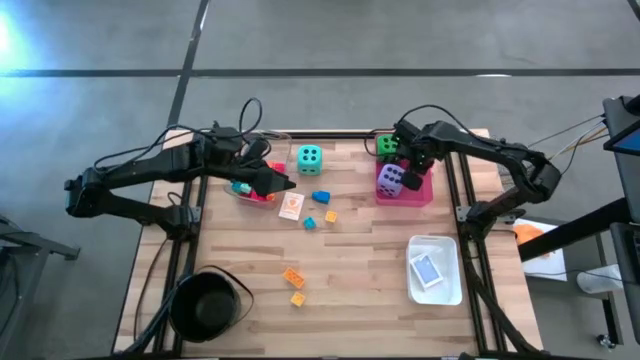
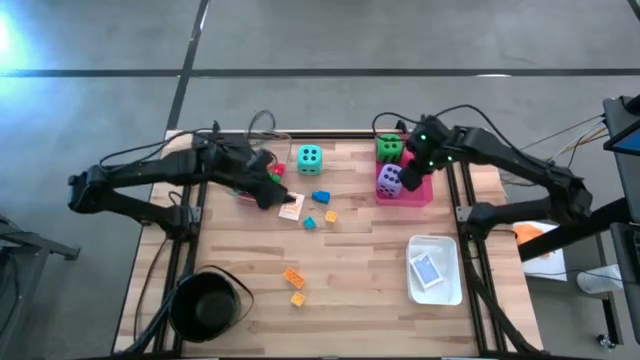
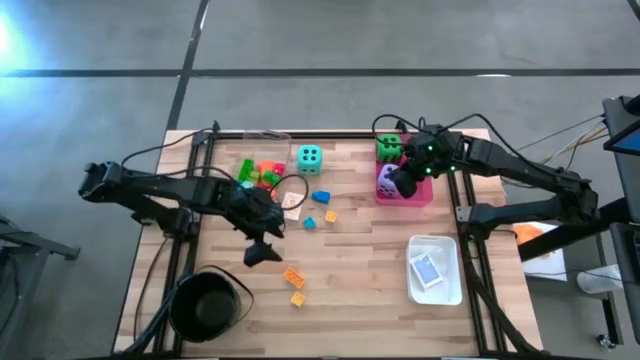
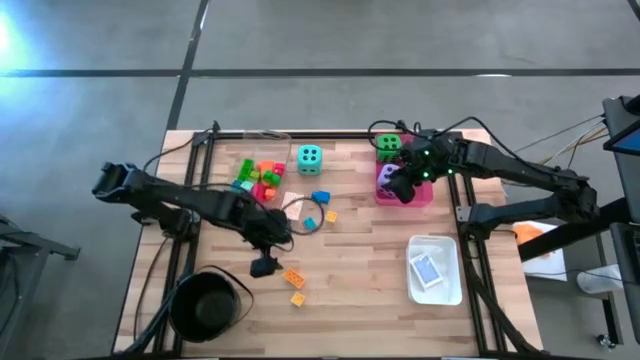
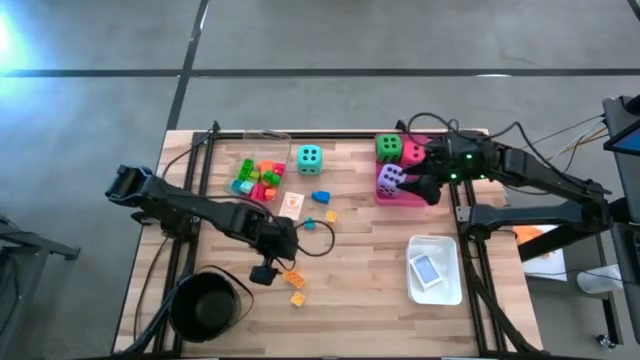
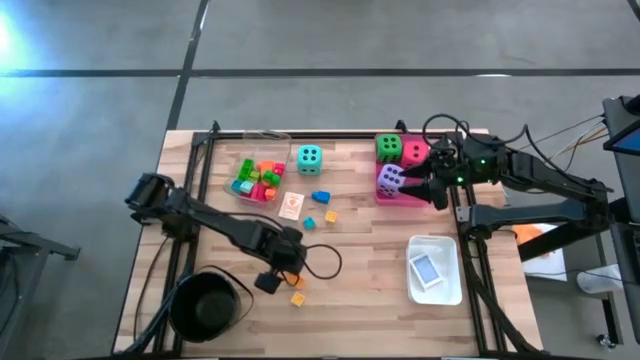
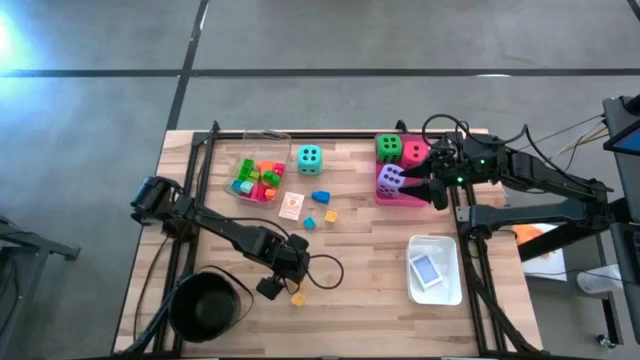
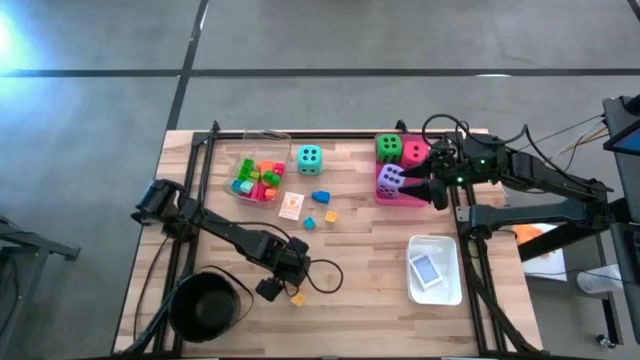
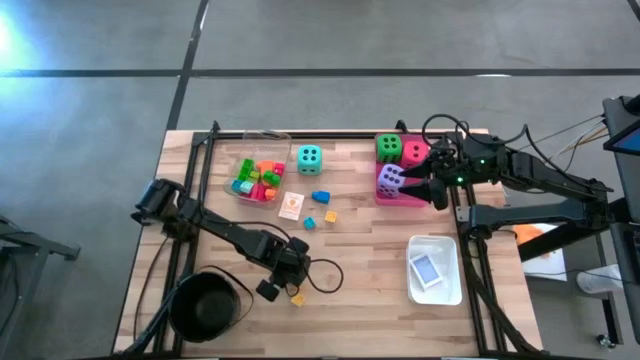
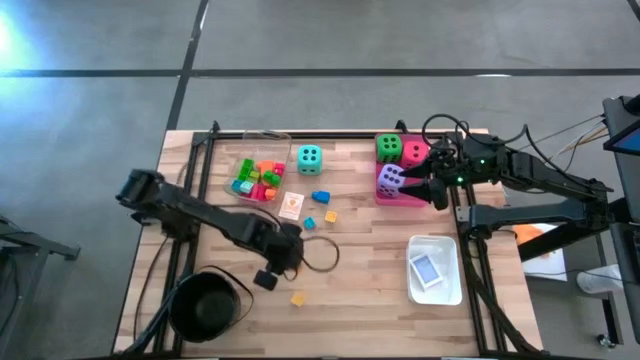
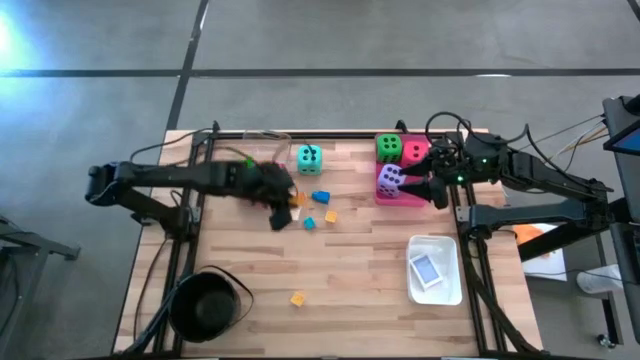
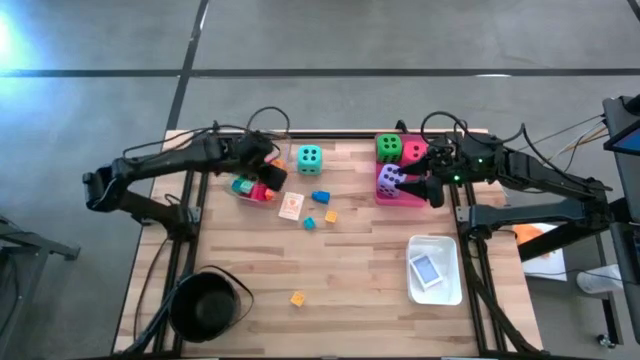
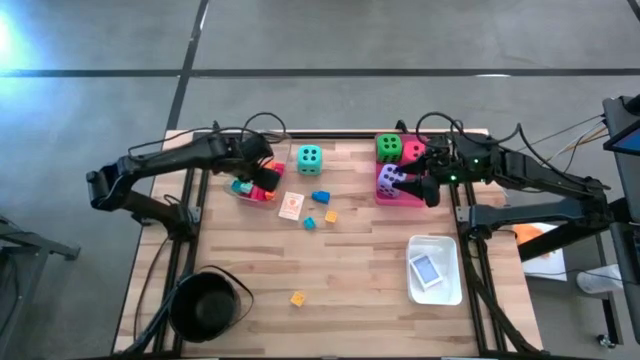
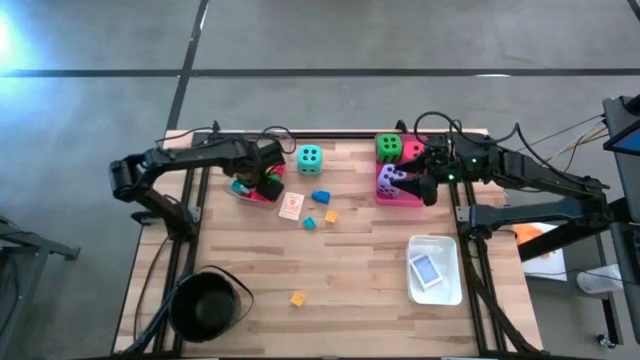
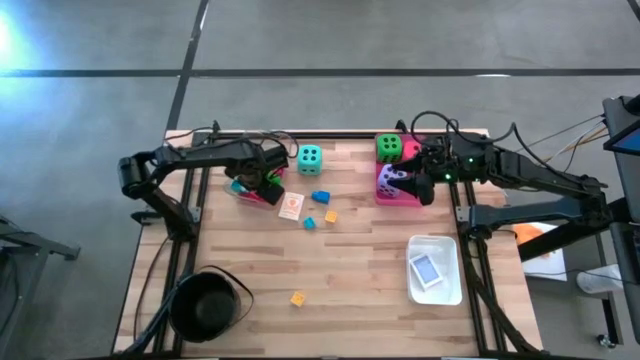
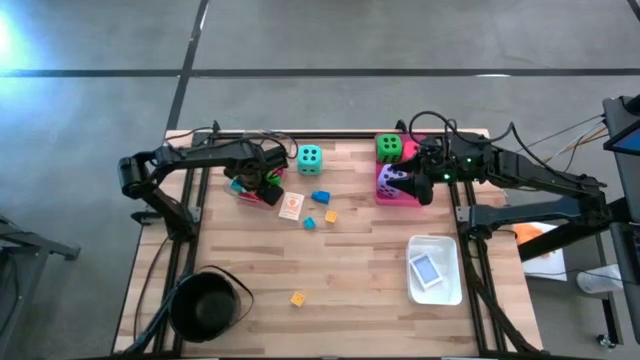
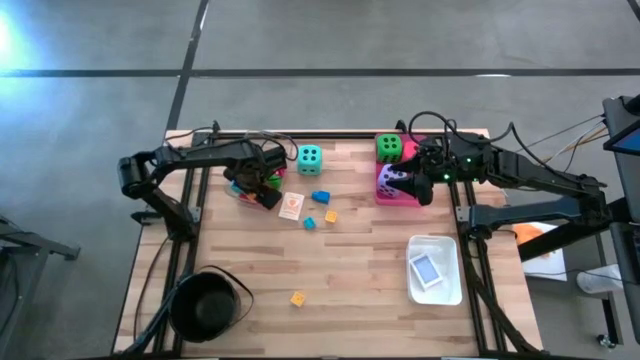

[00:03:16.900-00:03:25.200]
Task: Pick & Place Toys
Put the yellow game piece into the transparent bin

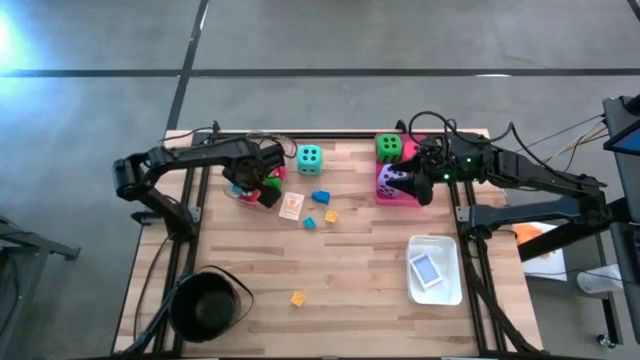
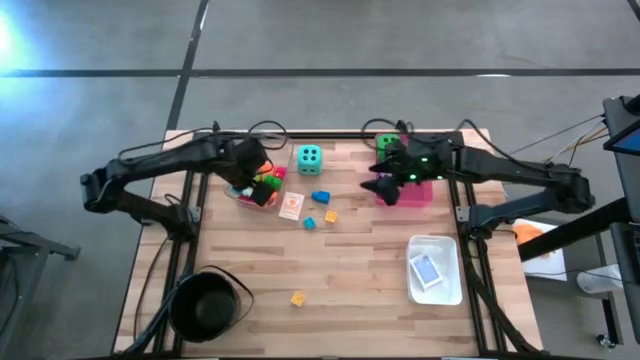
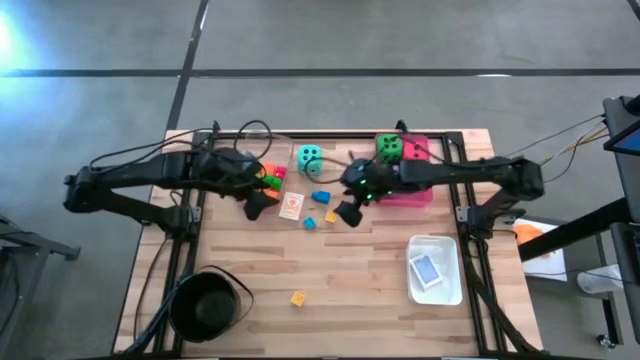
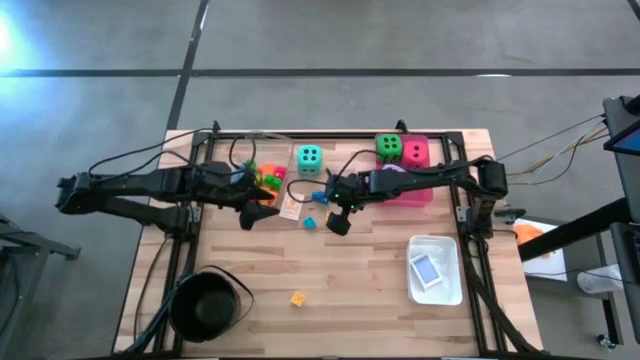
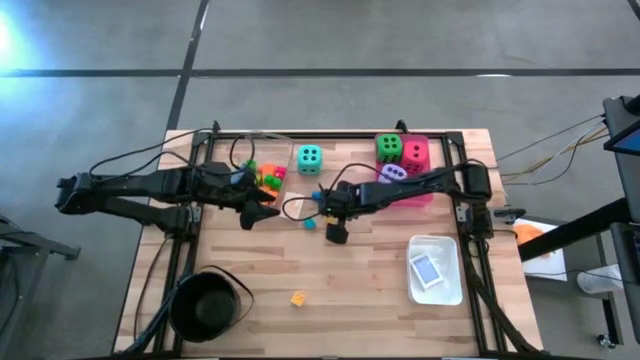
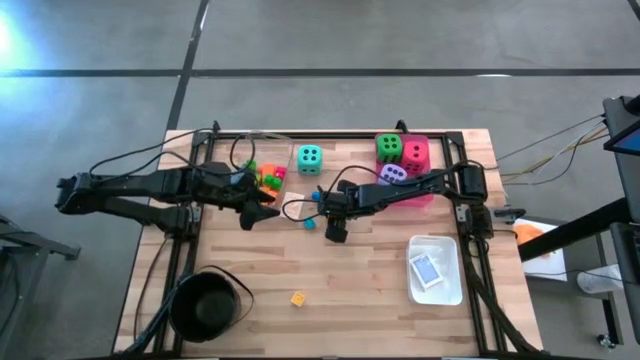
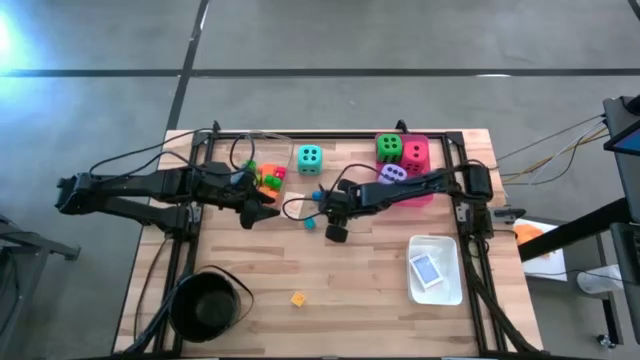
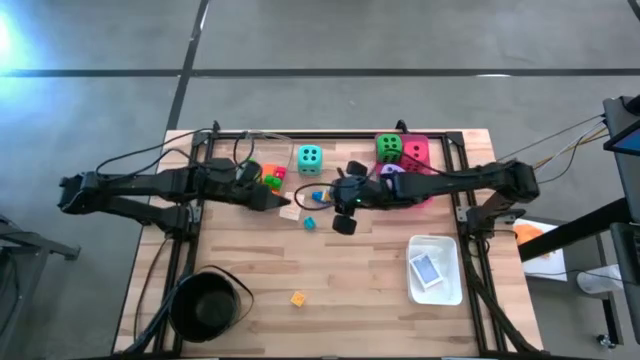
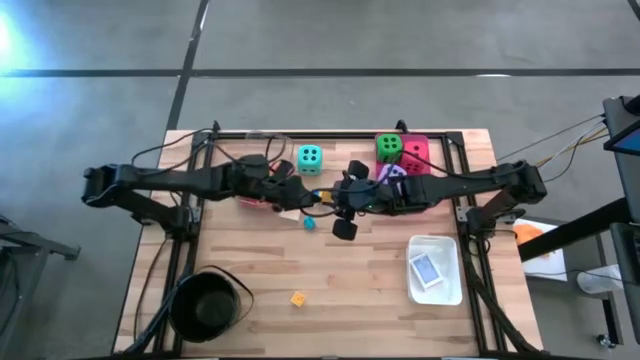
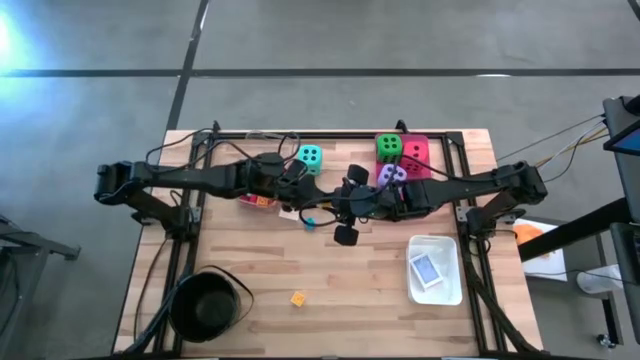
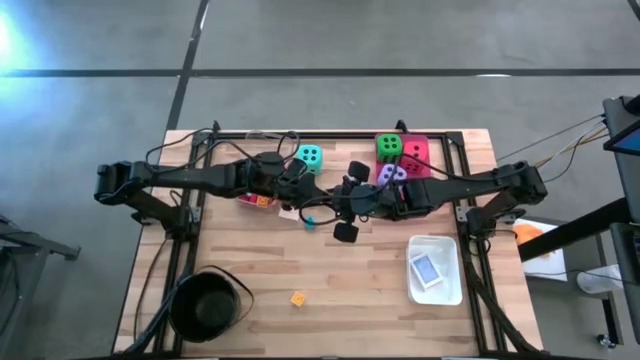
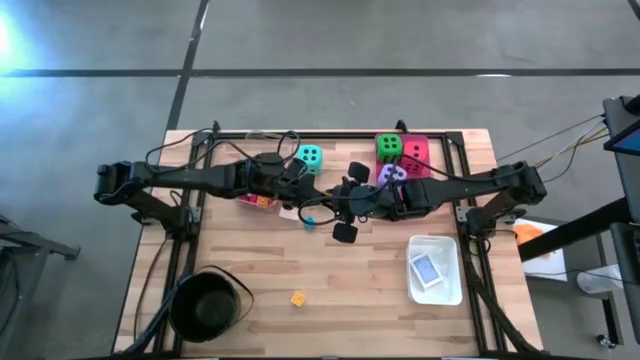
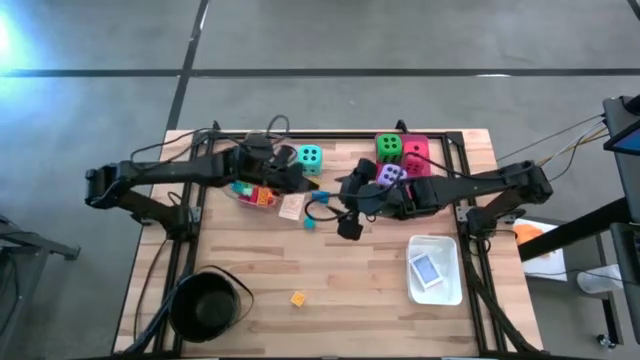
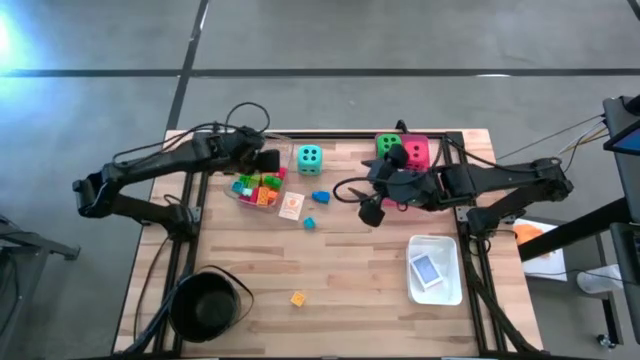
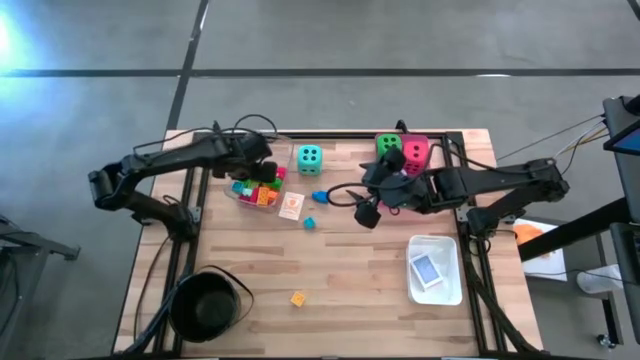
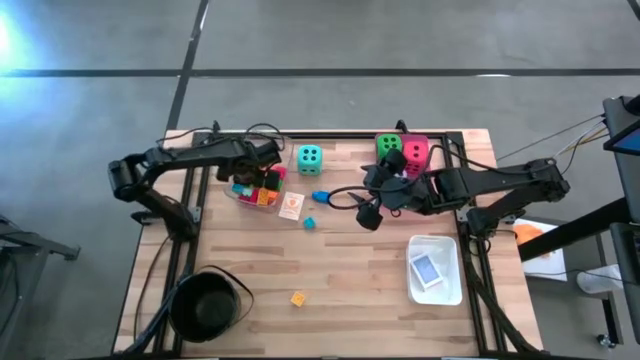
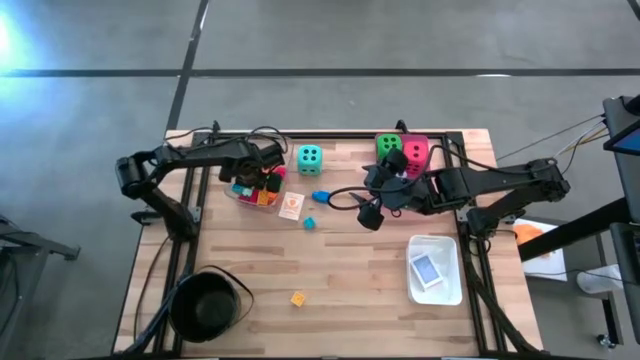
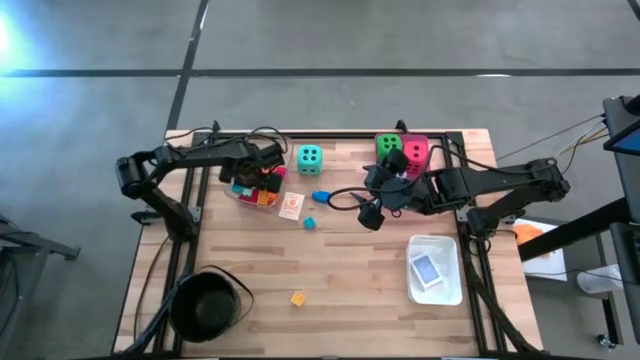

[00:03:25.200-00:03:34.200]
Put the light yellow game piece into the transparent bin

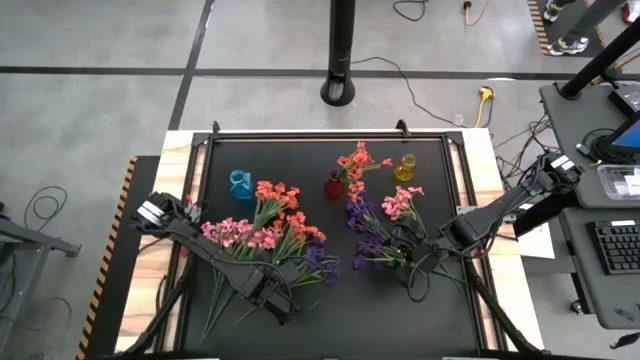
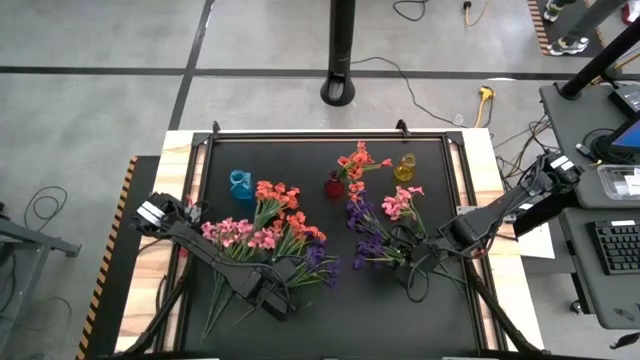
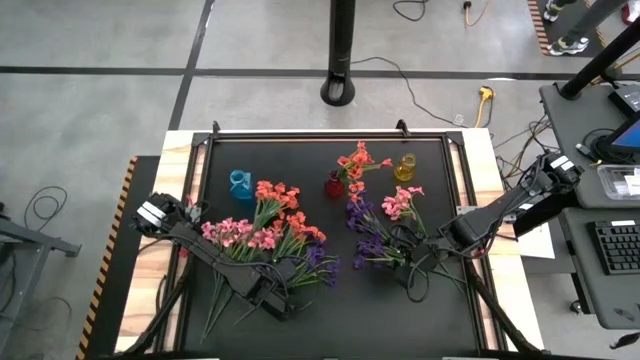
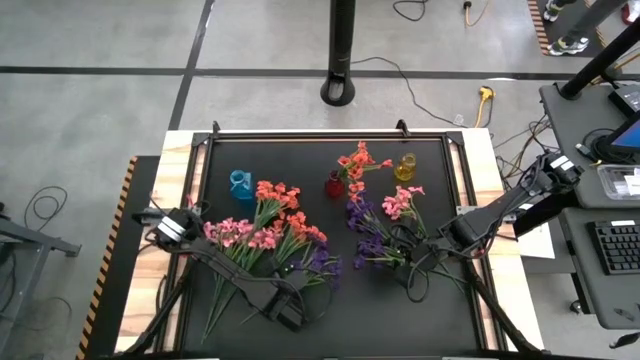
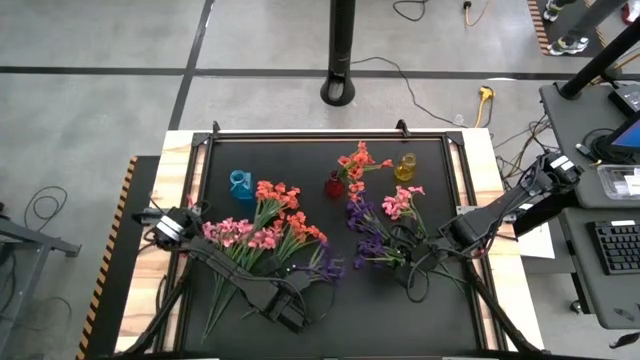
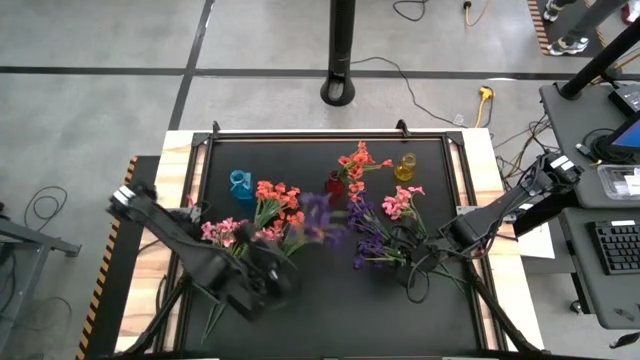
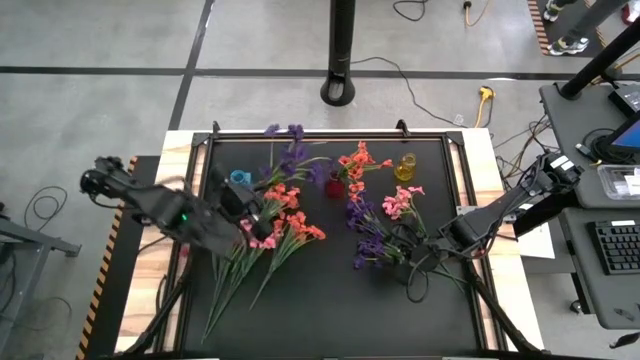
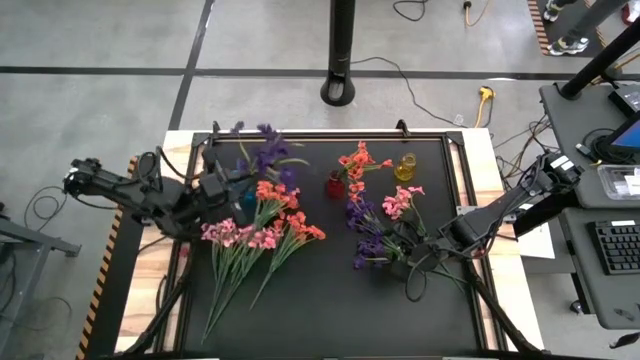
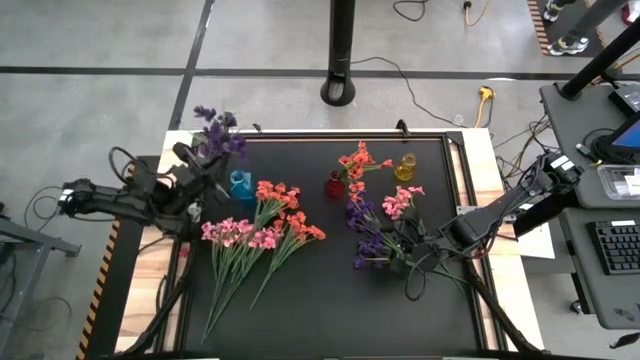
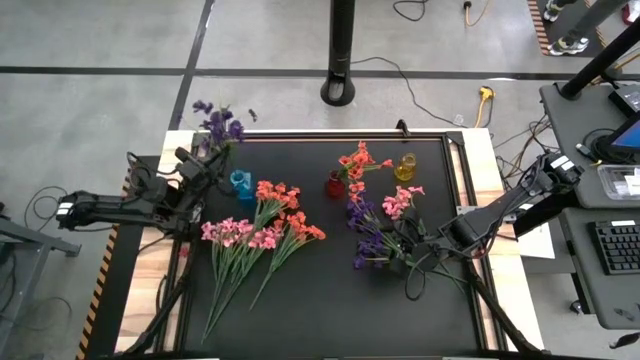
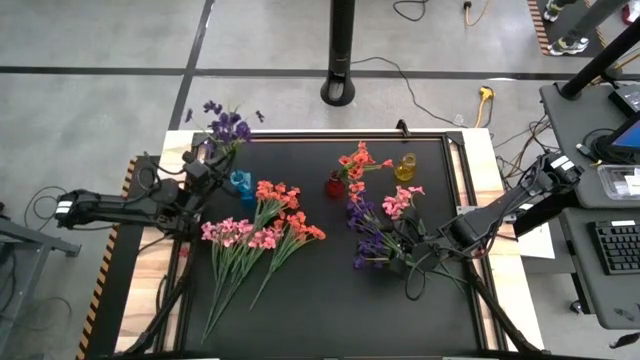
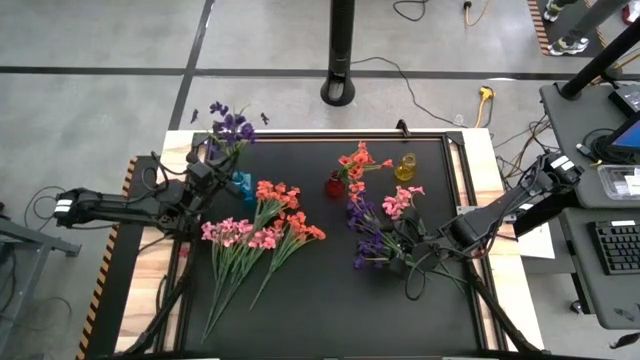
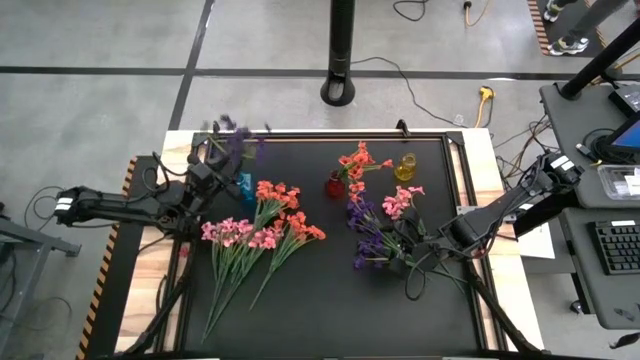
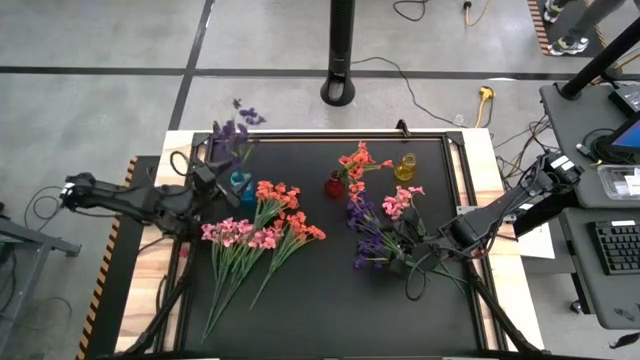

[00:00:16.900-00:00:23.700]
Task: Sort flowers into vase by color
Put the bottom left violet flowers into the blue vase
